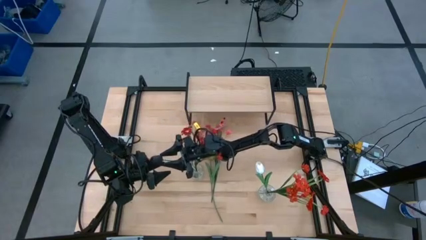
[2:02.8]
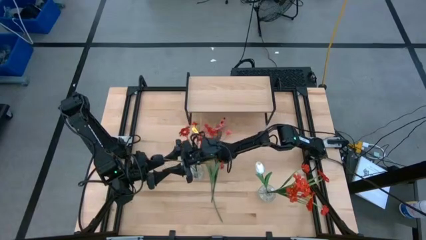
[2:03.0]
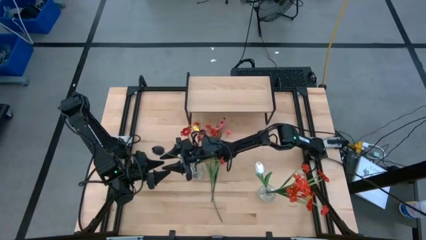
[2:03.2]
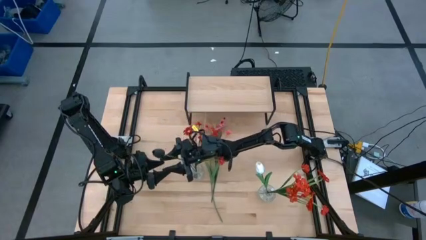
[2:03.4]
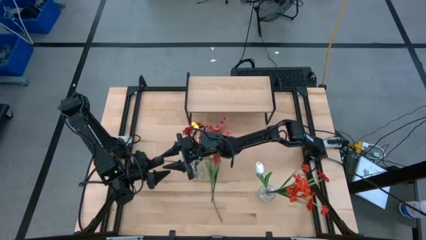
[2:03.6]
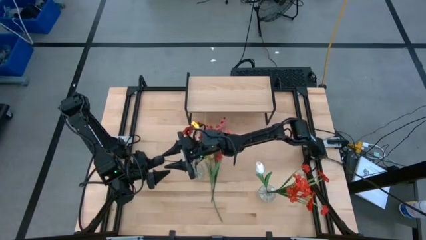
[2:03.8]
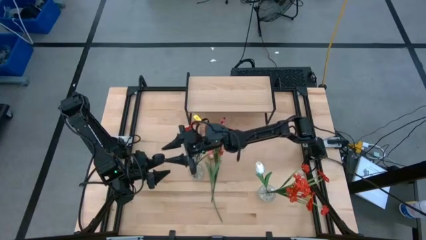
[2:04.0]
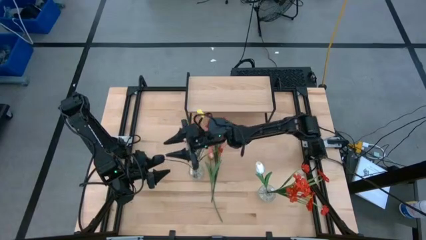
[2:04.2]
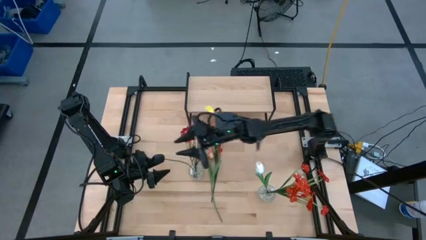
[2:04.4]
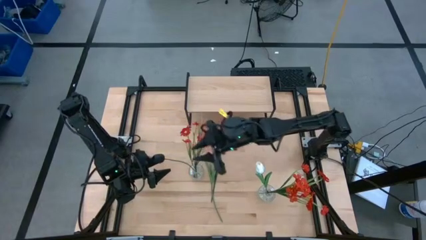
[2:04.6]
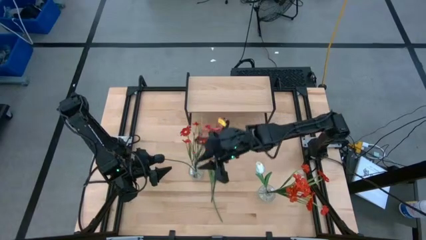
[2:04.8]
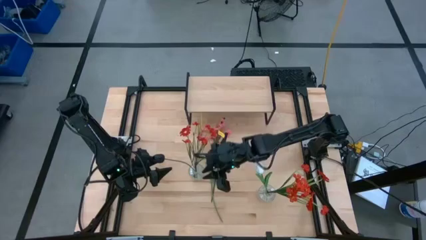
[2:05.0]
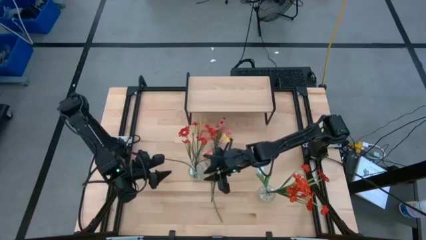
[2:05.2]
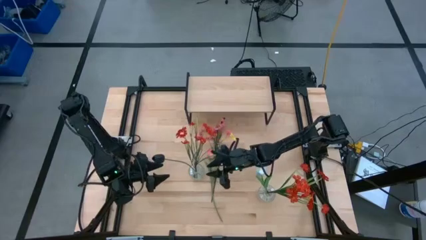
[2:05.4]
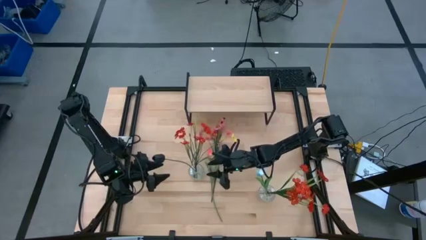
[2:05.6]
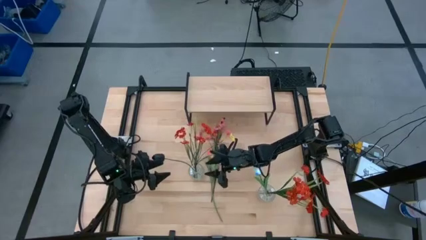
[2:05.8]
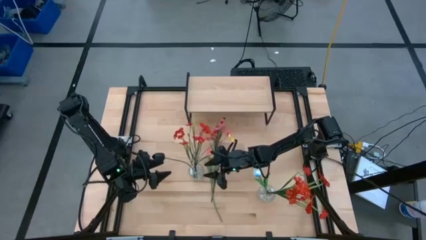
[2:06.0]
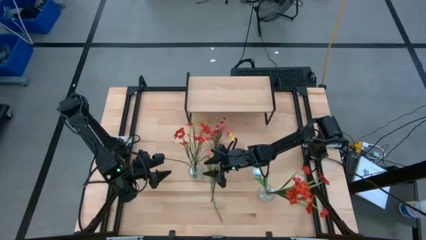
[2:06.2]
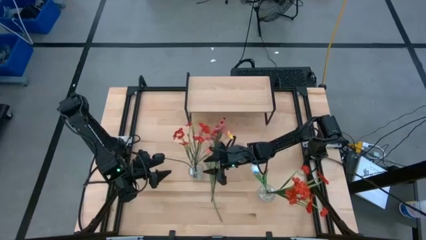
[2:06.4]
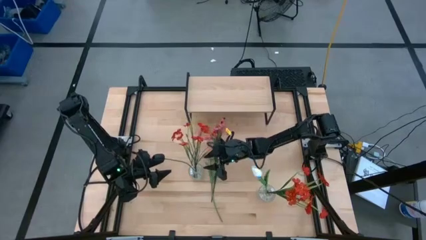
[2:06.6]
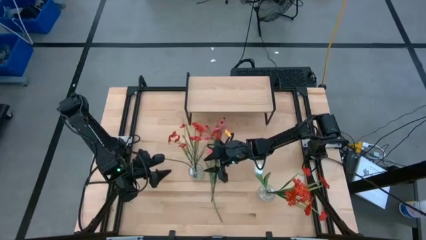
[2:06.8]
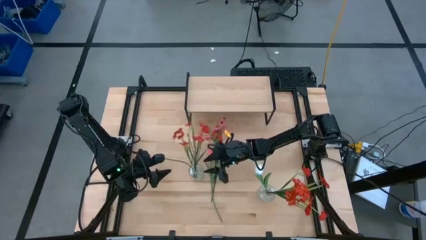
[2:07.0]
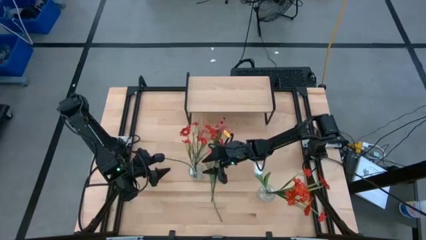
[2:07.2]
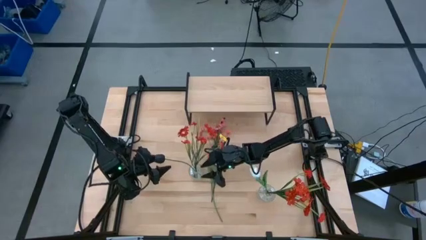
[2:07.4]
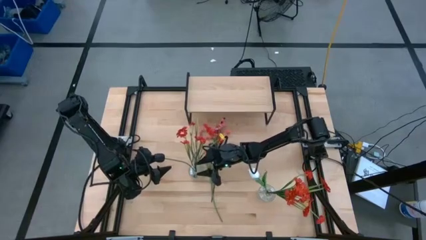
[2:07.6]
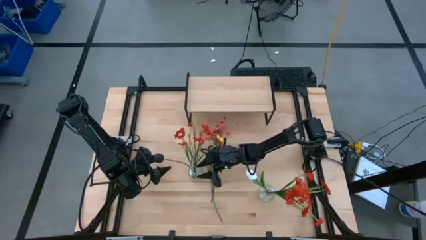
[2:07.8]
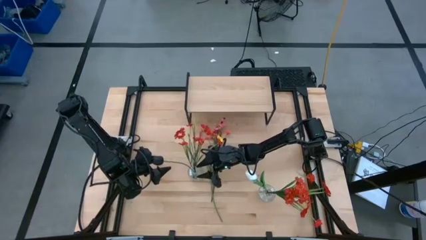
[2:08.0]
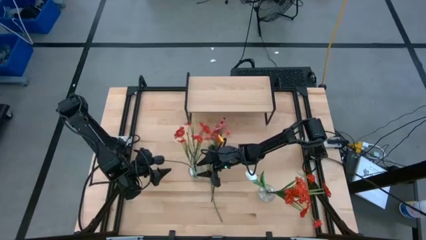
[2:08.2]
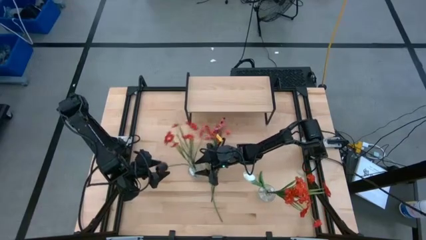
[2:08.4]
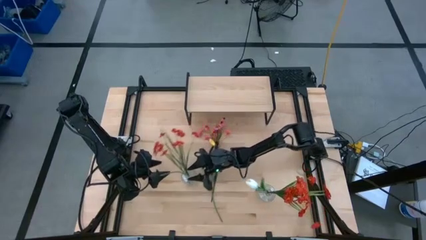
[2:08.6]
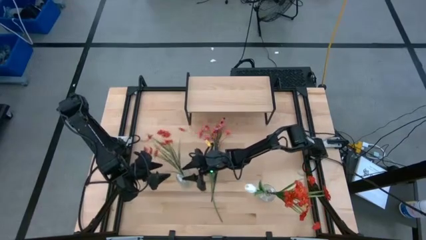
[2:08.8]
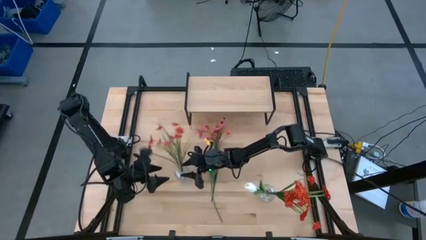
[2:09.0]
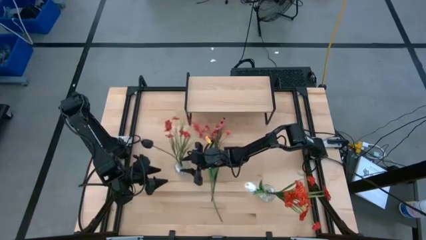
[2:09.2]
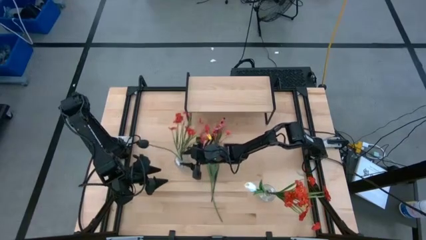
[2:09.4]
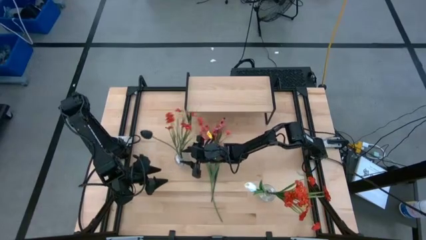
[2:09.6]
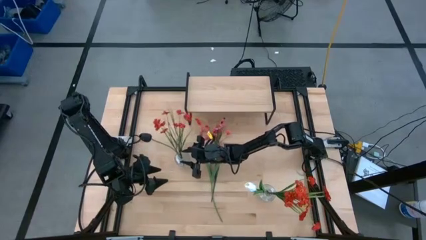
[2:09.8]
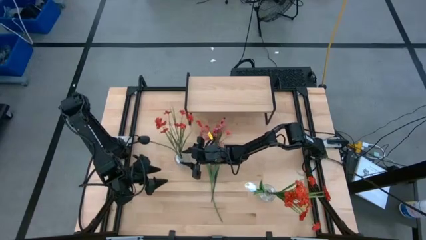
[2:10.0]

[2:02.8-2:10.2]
Task: Pick and place flowers into a vace then onto a shelf
Move the left transparent vase to the middle left of the table

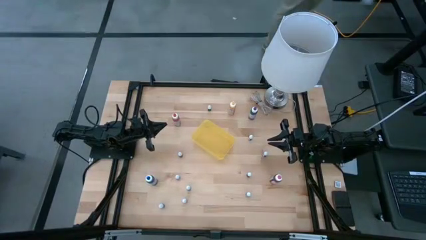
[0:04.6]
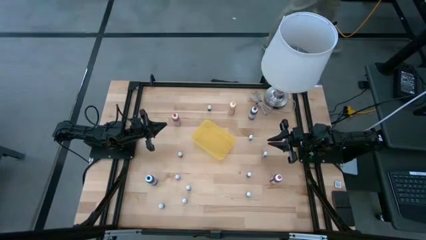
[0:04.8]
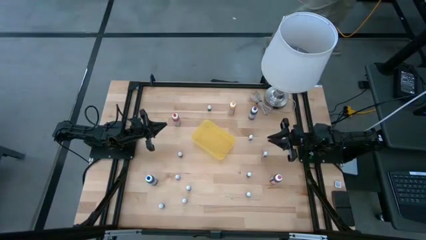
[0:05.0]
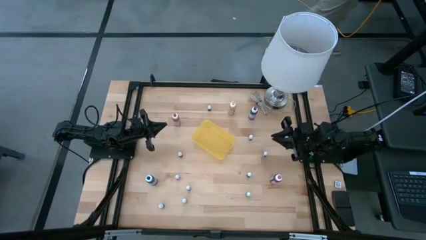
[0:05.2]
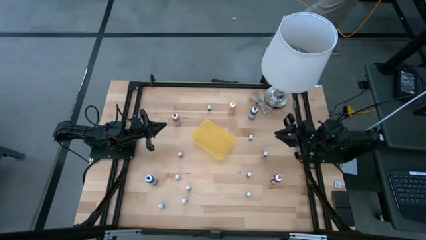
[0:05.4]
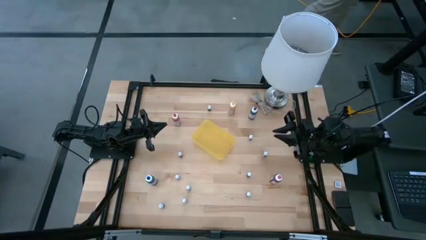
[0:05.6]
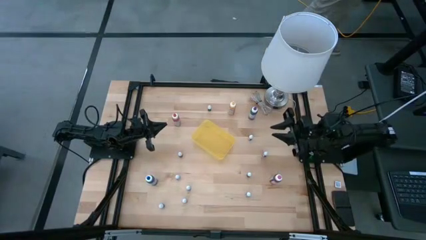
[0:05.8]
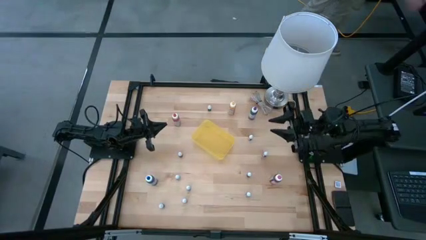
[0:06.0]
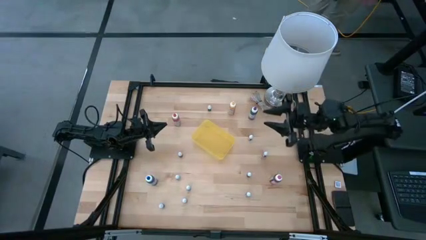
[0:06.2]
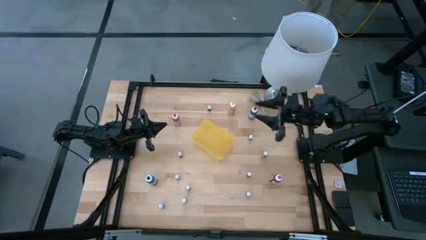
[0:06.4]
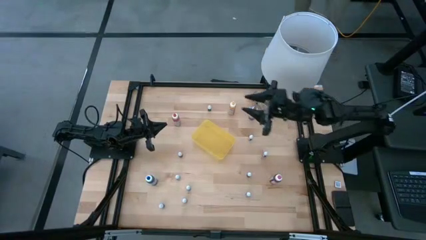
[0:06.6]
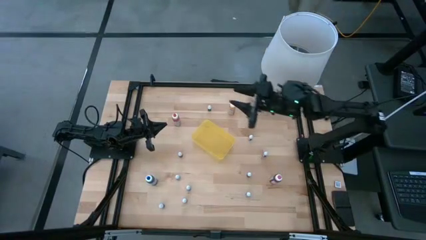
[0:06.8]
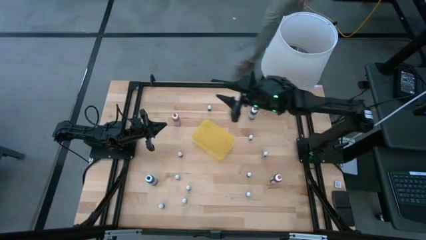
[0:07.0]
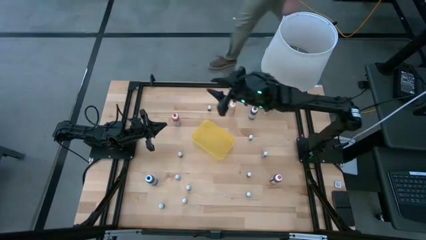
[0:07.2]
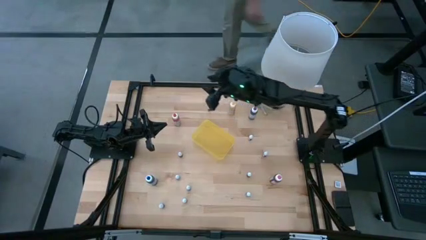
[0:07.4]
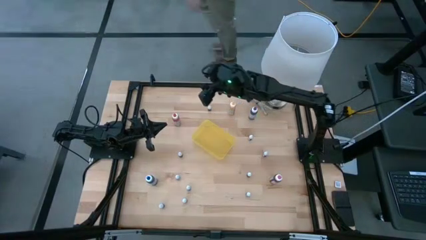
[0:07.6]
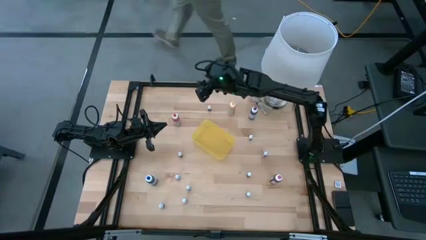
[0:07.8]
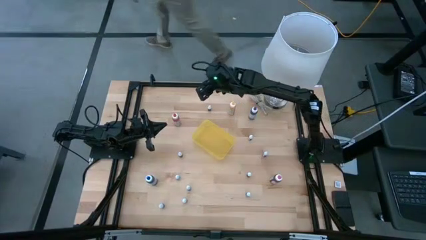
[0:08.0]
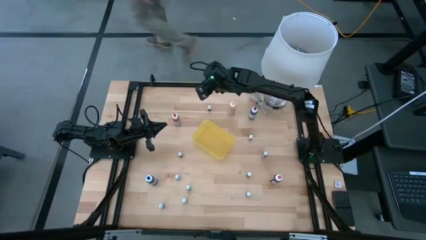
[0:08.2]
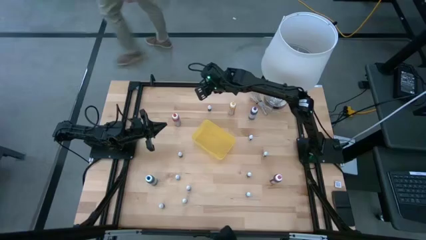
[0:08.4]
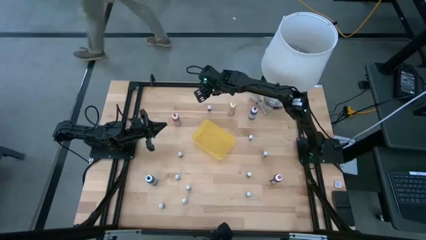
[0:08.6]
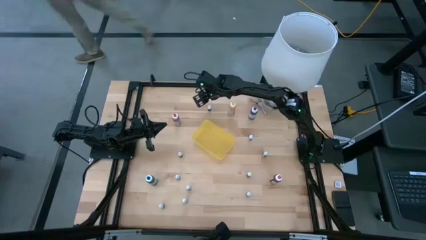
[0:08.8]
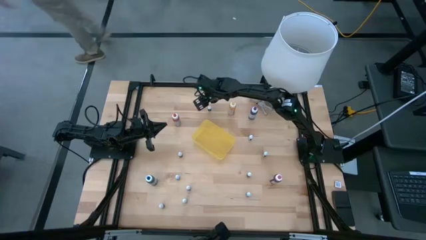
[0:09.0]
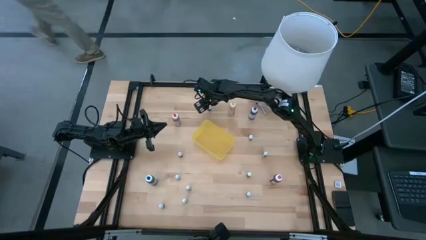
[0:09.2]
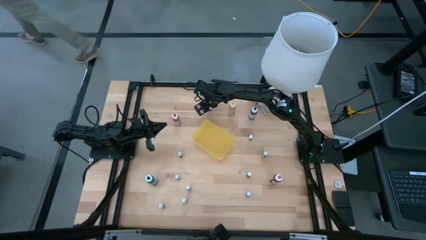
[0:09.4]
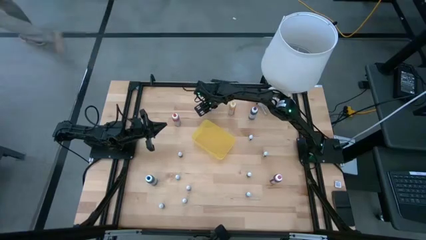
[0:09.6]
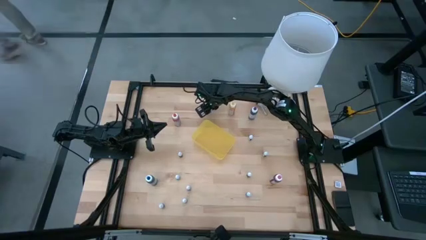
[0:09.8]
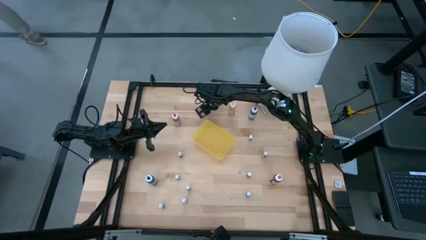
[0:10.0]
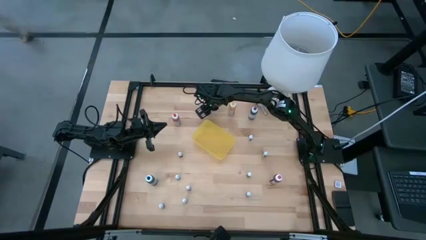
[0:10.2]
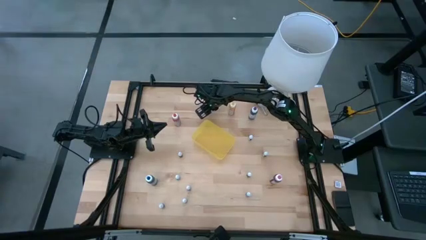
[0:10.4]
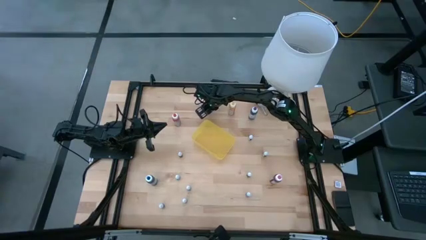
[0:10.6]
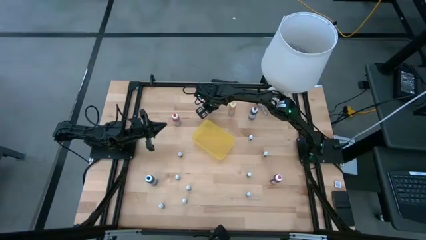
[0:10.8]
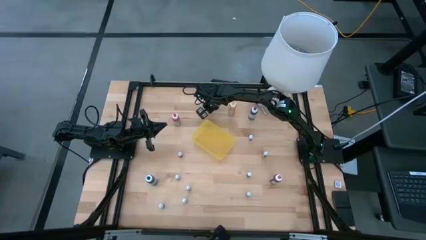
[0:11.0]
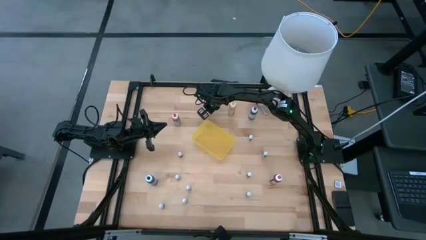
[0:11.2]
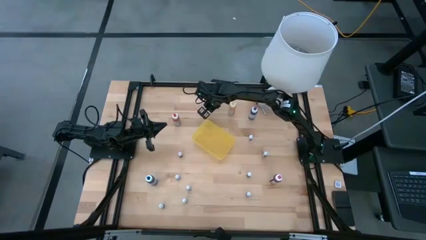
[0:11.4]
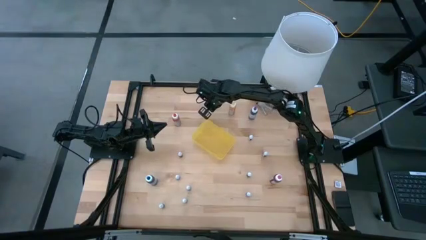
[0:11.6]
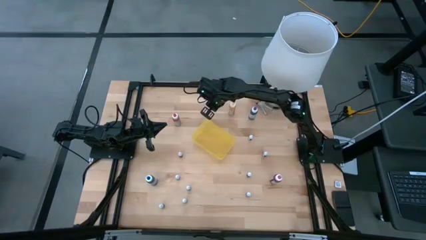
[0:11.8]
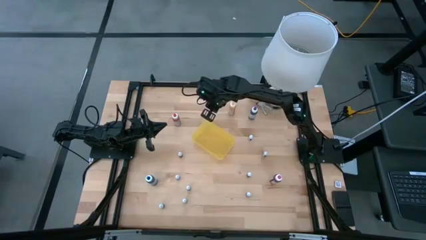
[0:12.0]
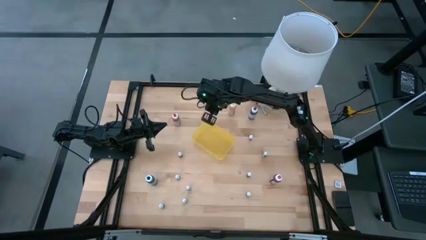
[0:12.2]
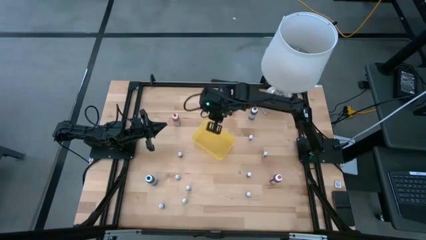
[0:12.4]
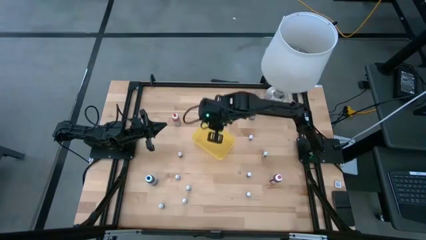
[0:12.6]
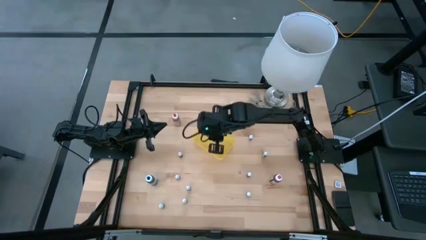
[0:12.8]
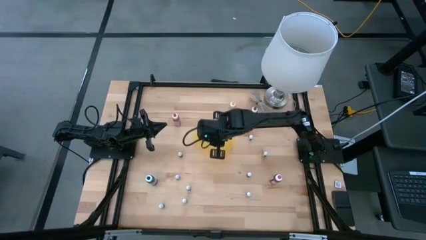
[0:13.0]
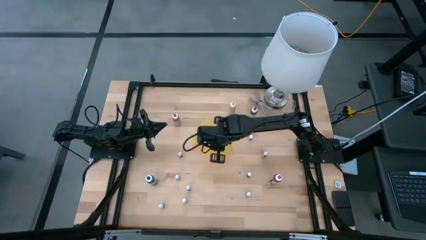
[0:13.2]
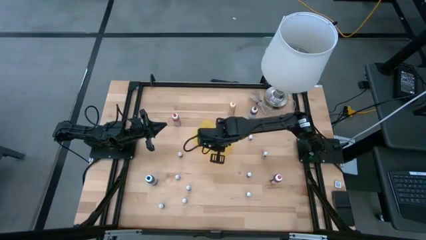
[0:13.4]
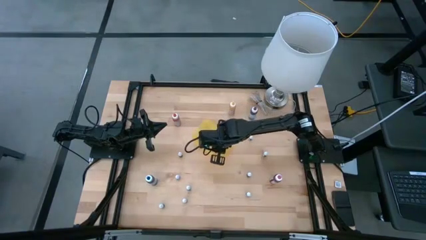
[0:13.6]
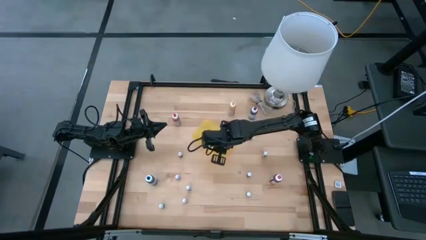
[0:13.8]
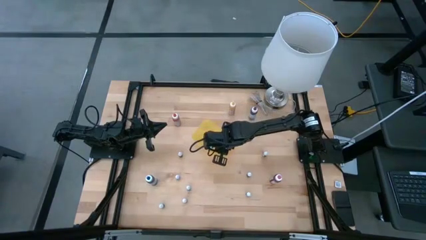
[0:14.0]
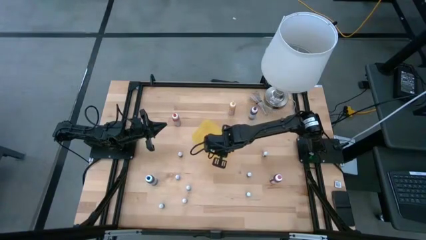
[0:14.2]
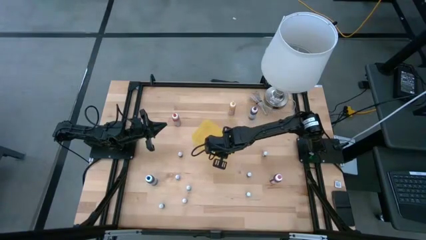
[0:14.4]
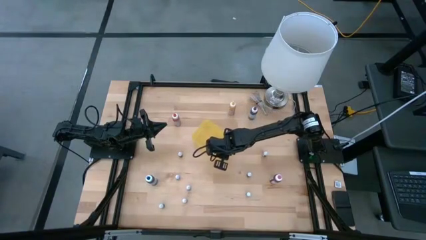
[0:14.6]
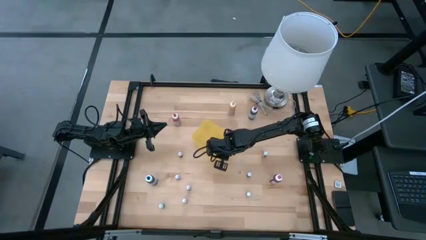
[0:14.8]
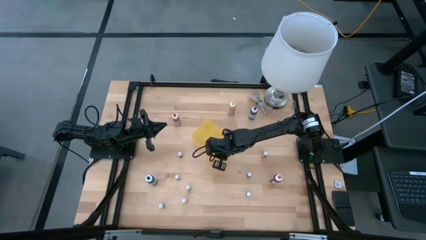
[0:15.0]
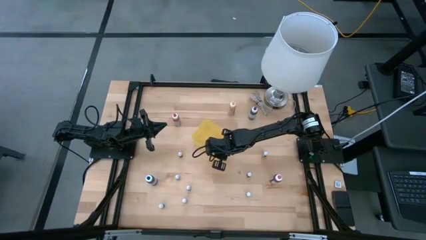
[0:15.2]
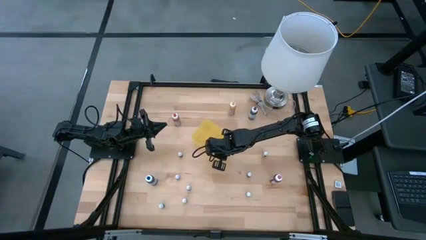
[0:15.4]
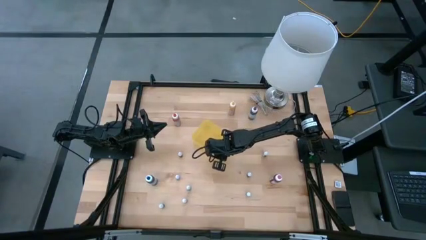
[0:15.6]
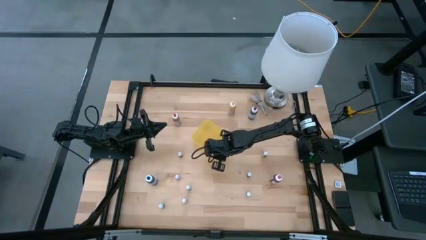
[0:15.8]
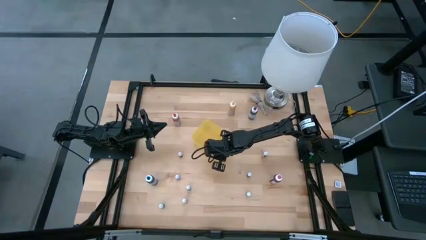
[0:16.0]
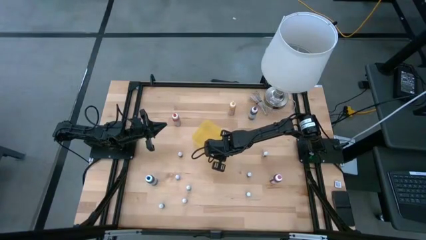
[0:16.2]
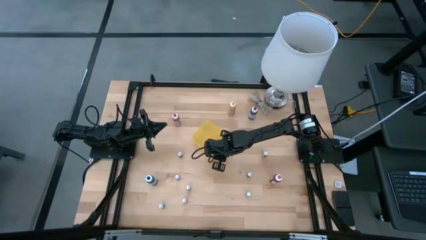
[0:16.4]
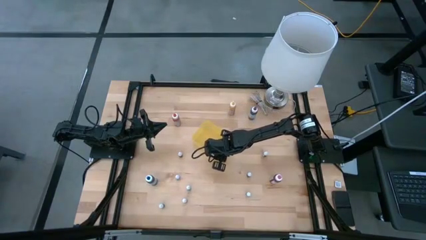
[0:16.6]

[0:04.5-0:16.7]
Task: Pick & Place food coloring
Put the small black food coloring bottle into the yellow bin
